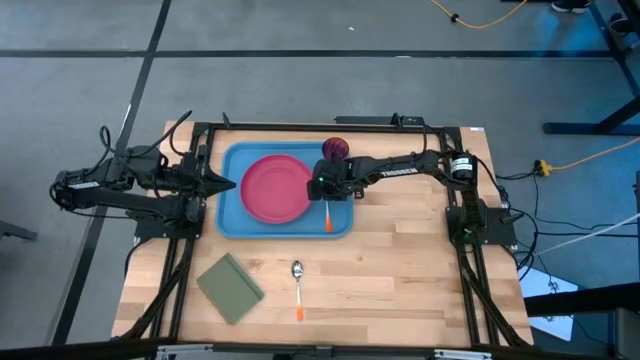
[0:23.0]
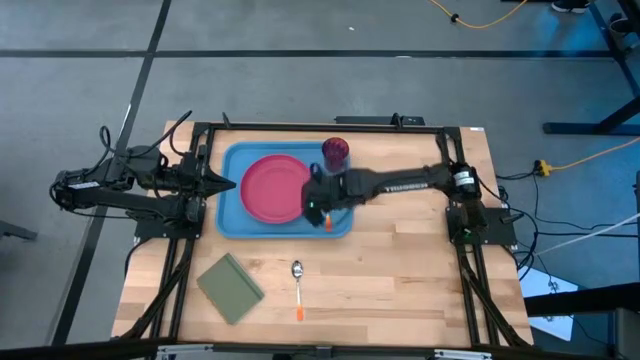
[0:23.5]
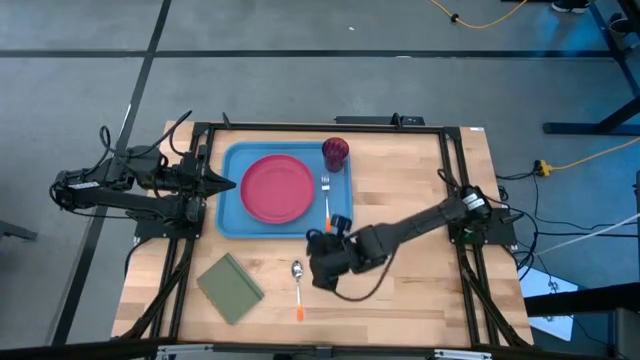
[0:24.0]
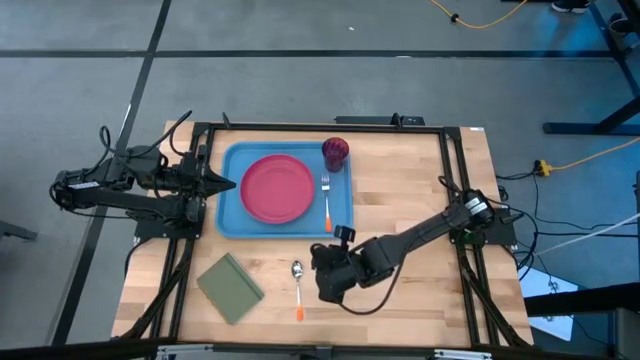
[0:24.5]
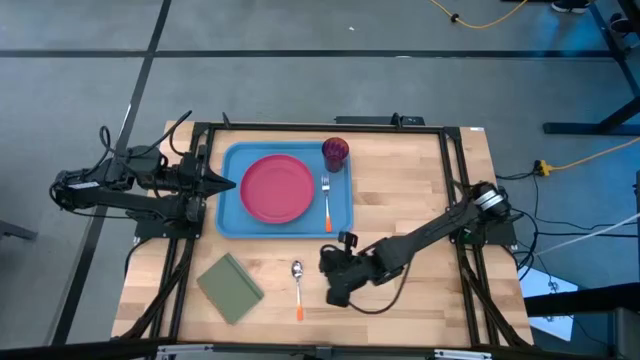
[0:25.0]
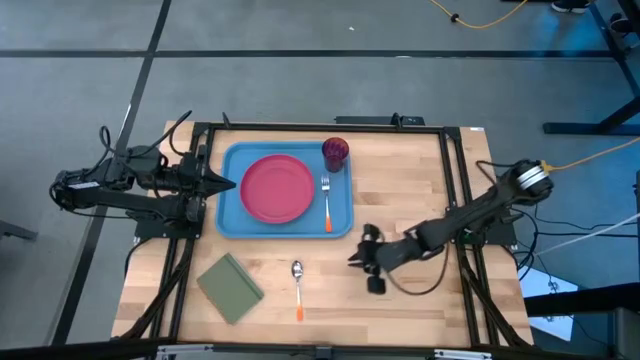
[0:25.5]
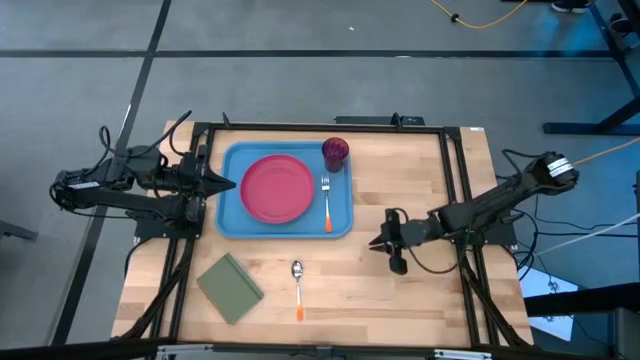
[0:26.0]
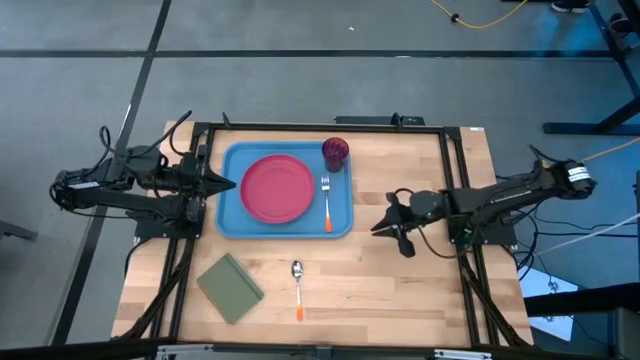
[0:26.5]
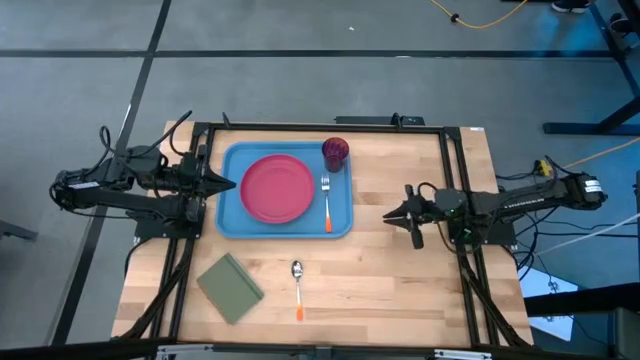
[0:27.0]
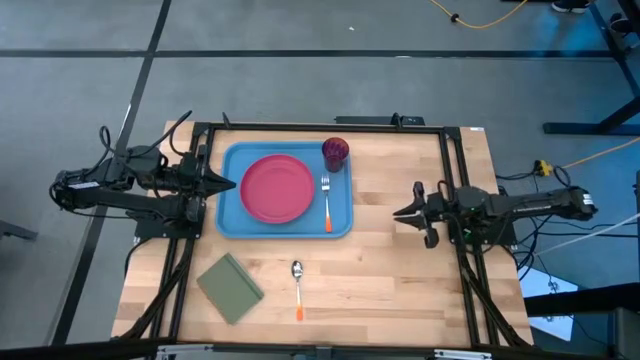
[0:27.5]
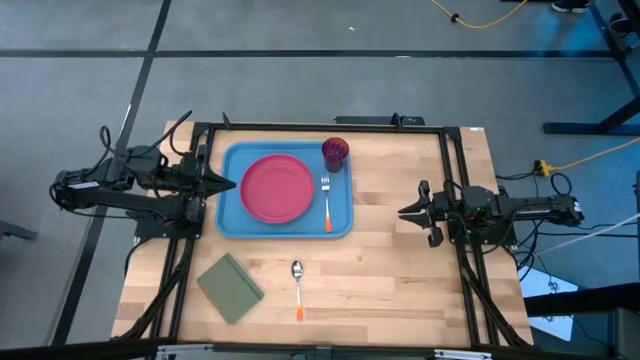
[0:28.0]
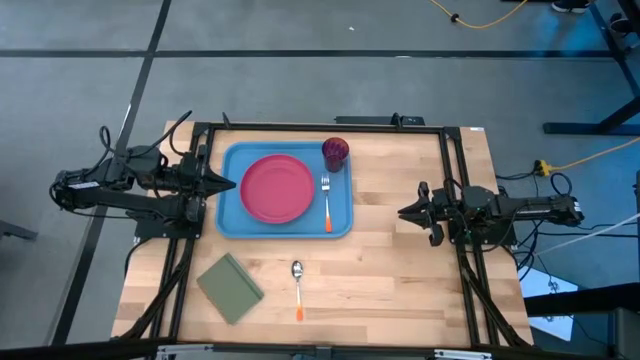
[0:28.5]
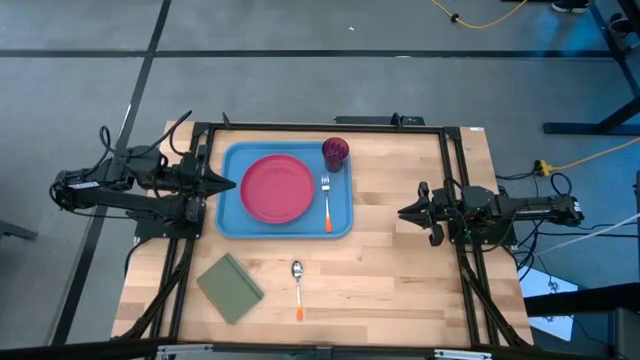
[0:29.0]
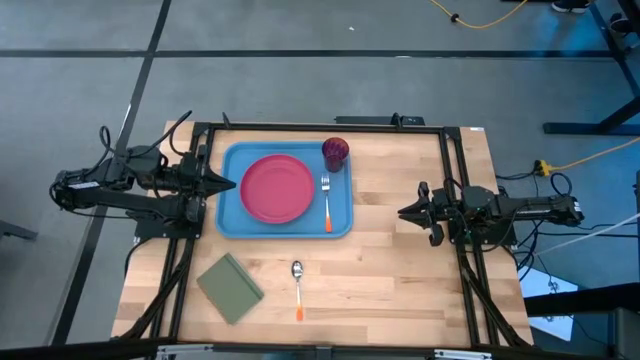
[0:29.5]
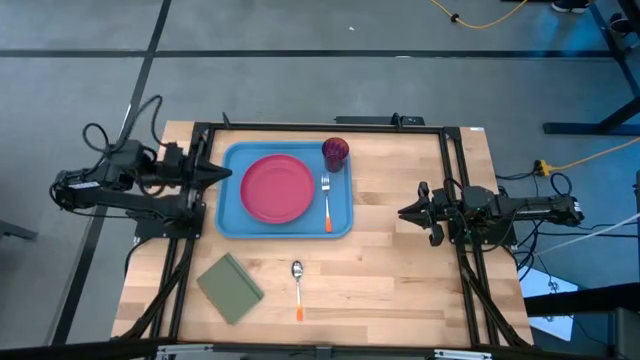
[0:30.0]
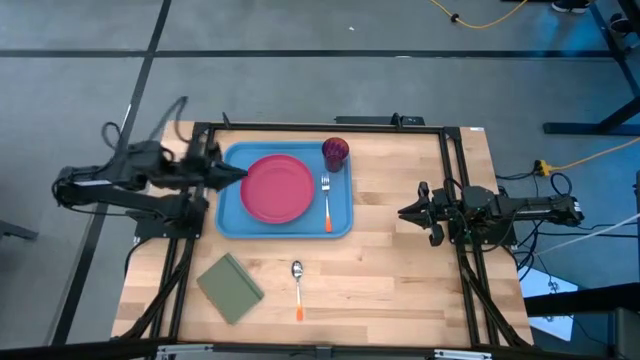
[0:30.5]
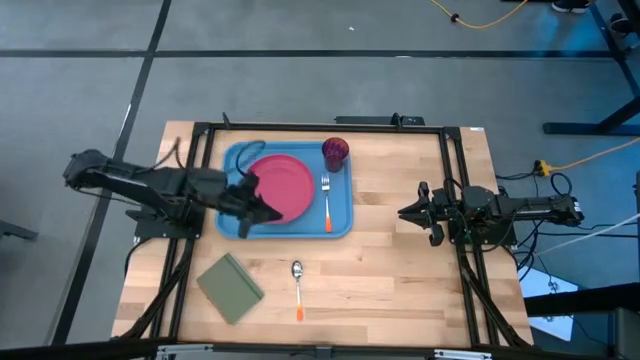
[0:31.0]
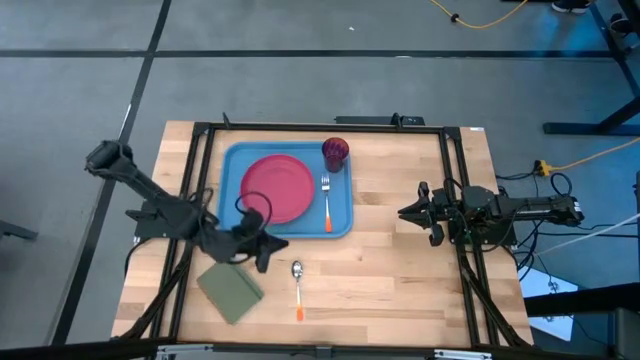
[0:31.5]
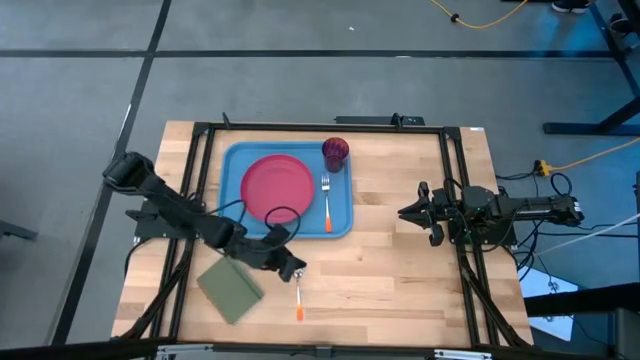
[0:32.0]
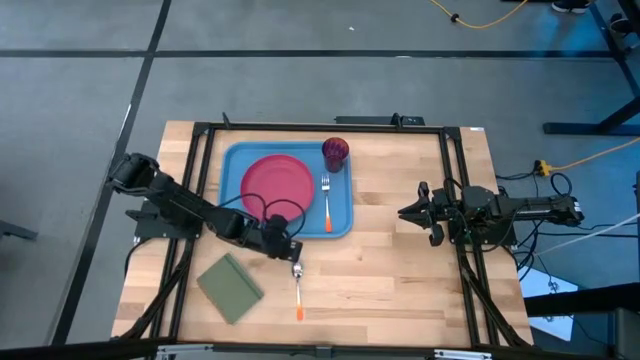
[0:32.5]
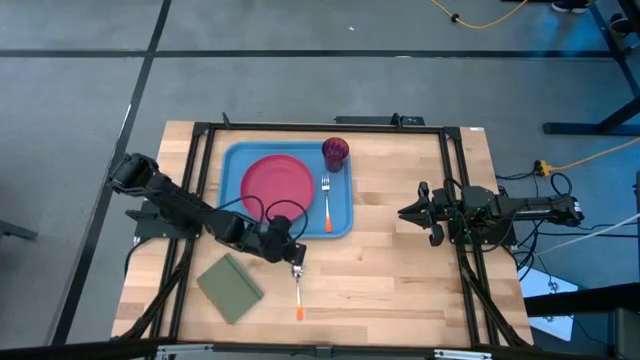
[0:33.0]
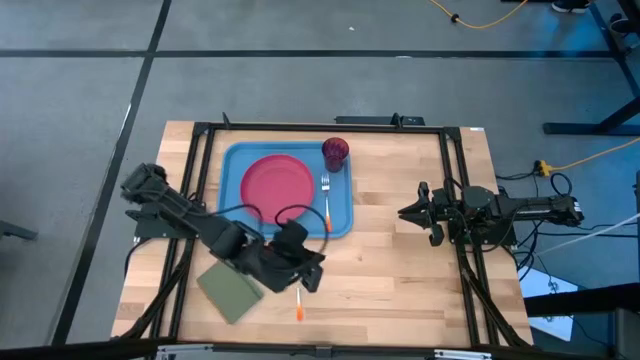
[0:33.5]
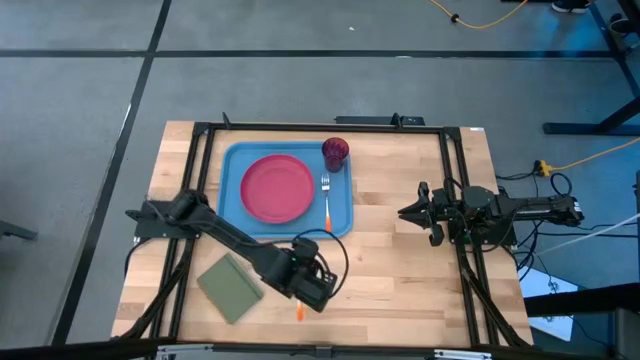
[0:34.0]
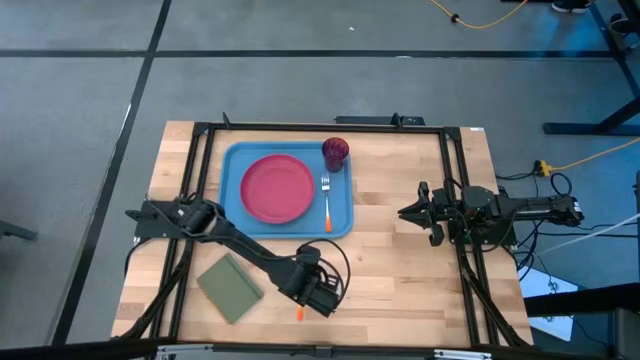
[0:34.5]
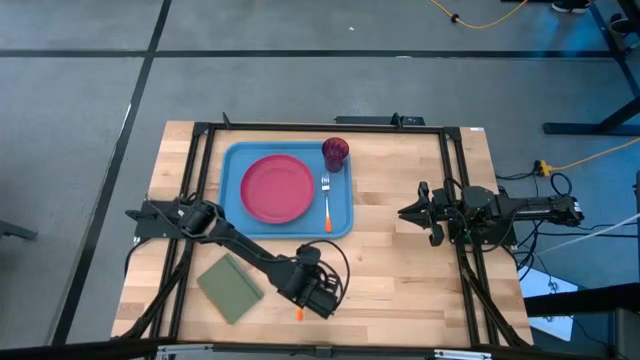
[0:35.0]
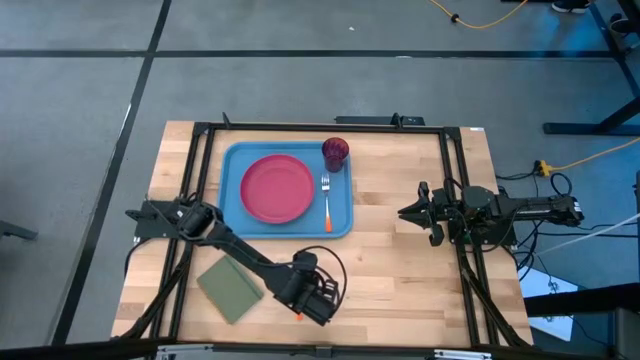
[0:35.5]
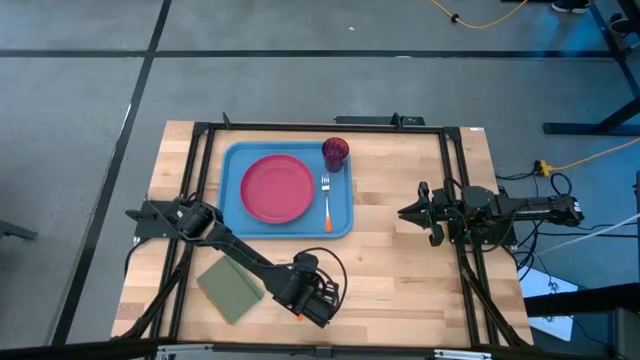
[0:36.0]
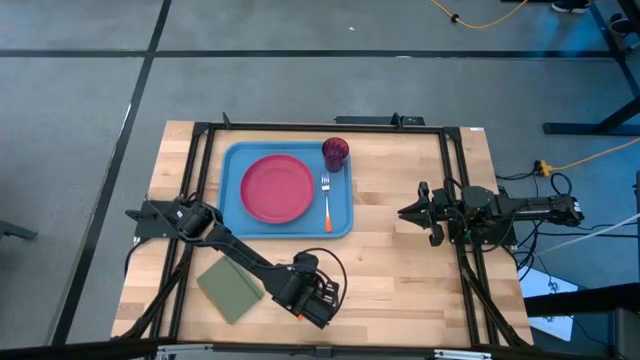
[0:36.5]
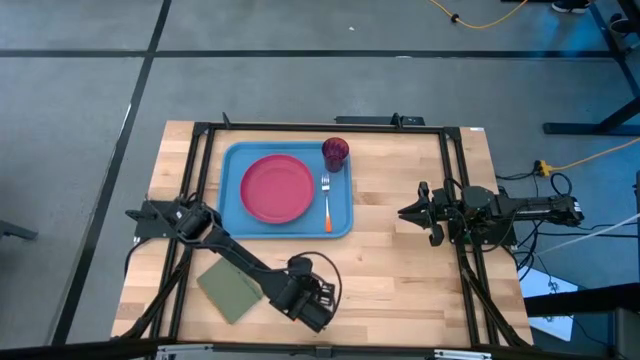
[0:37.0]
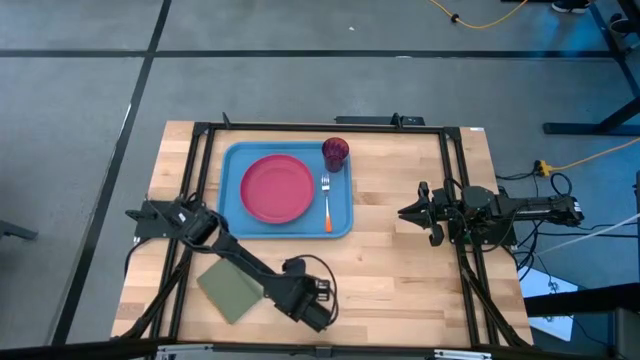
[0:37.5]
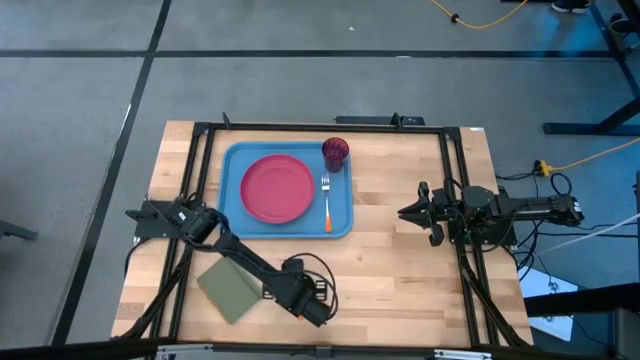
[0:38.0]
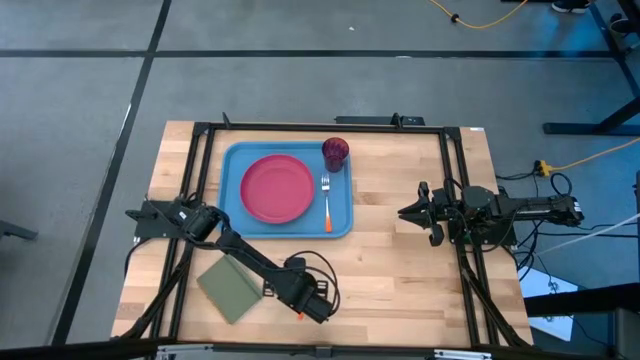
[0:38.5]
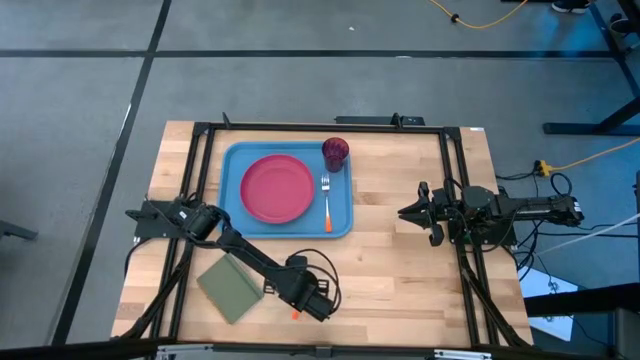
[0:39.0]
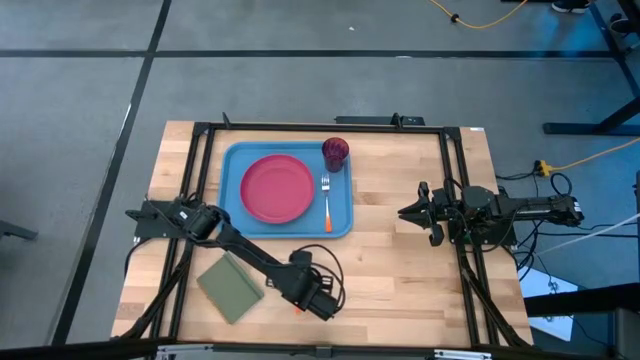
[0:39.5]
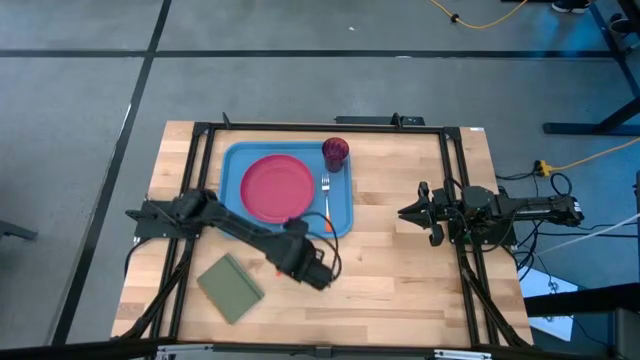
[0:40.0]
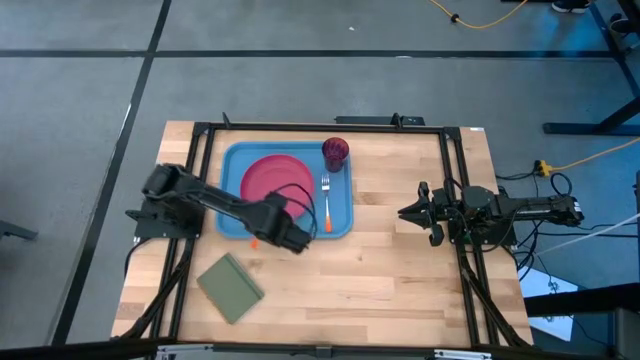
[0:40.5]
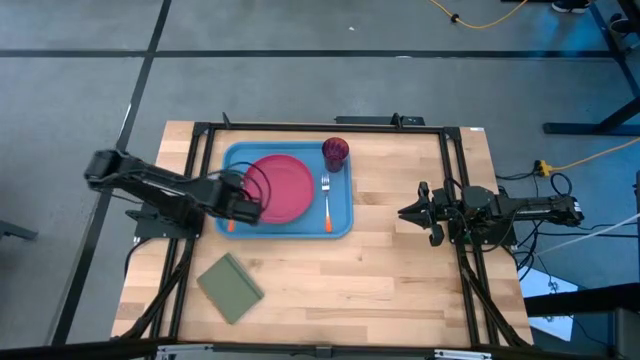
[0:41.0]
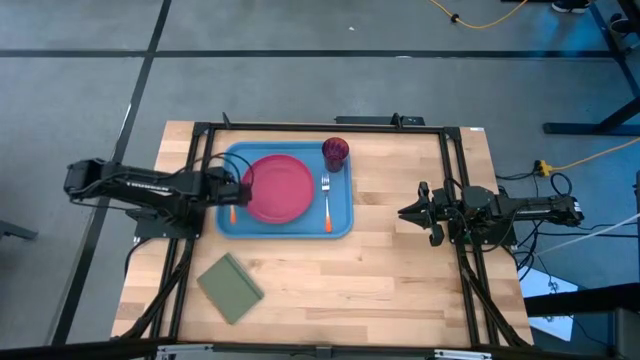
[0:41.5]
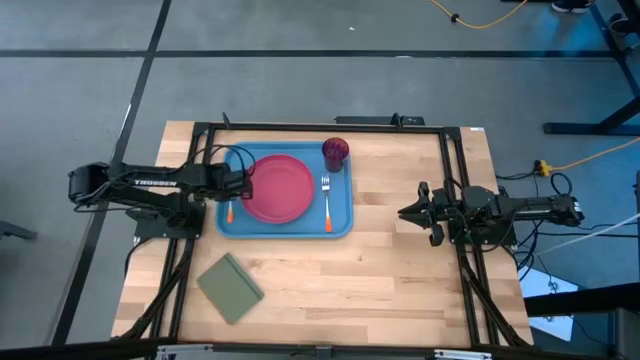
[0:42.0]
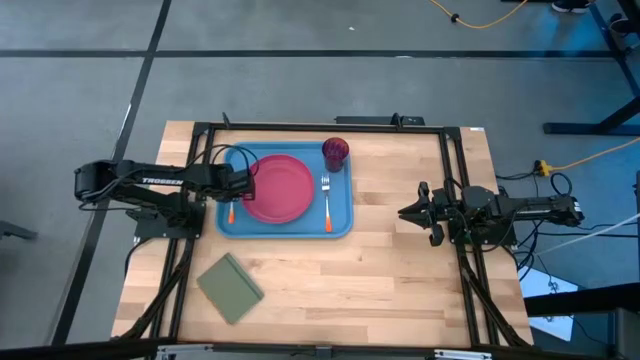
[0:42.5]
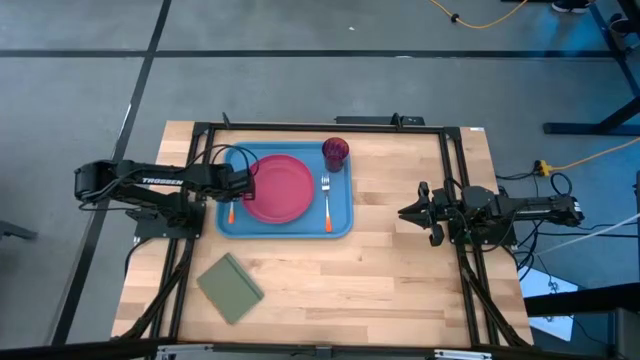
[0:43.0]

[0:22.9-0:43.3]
Task: Pick and place plate/cup/fork/spoon on tray
Put the orange spoon into the blue tray beside the pink plate

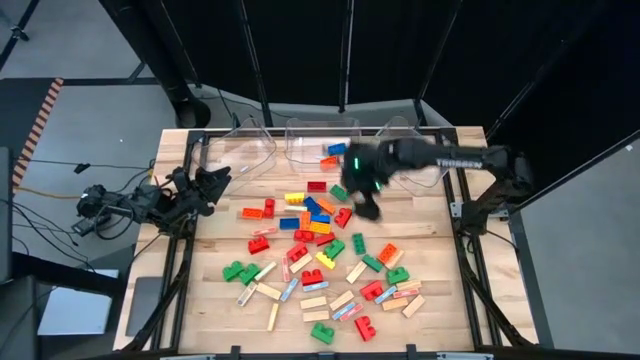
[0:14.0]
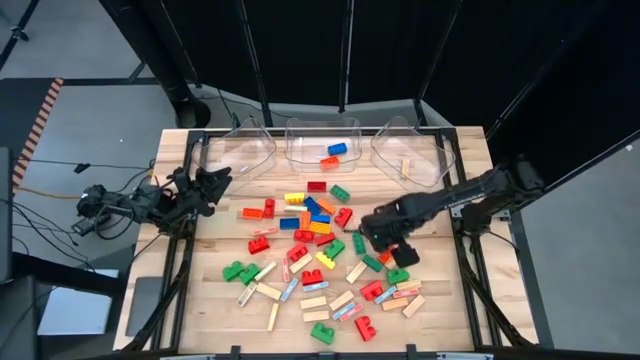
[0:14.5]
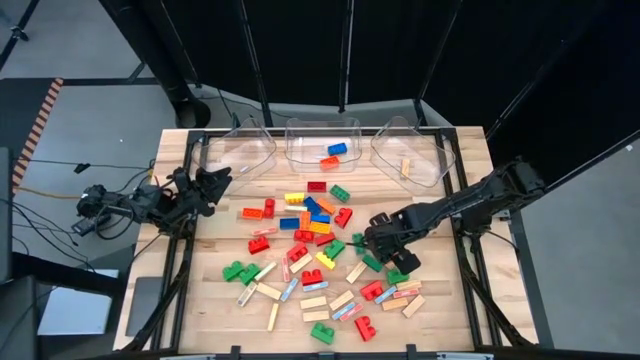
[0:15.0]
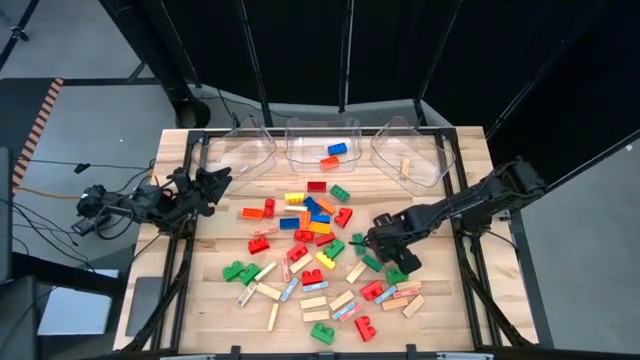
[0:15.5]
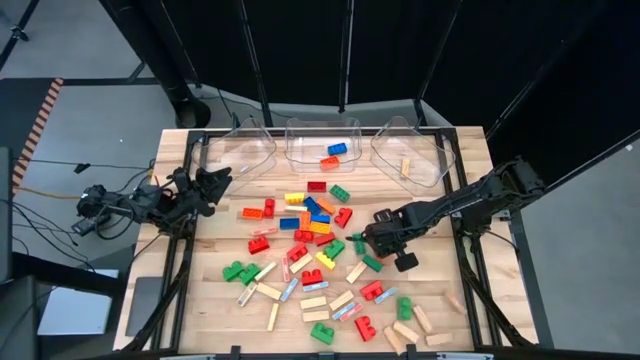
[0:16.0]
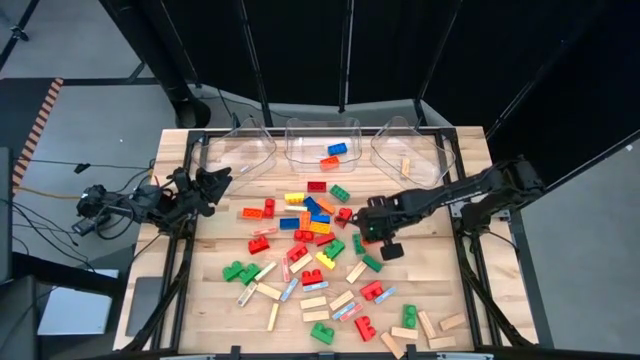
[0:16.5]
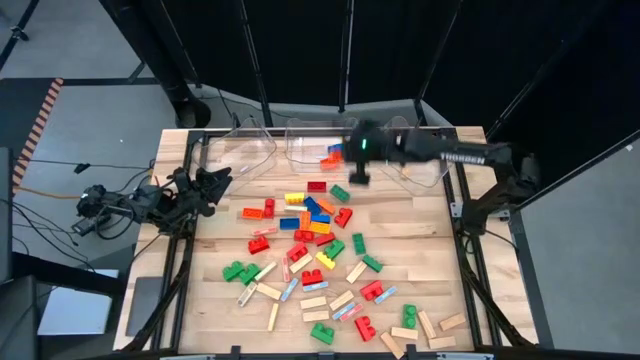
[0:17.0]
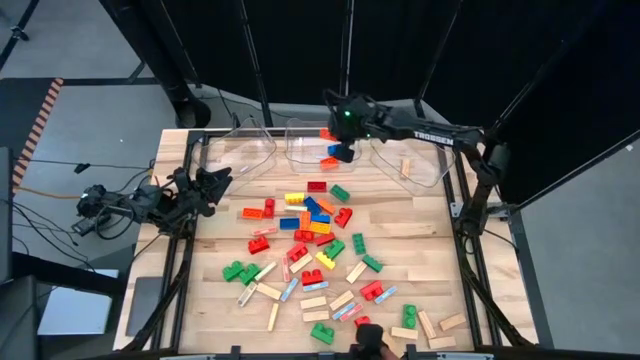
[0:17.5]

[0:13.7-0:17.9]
Task: Sort blocks by size
Put the large orange game piece into the middle transparent bin
